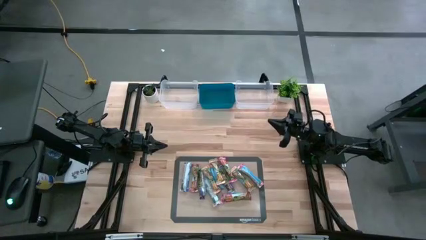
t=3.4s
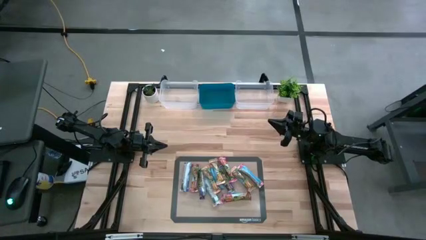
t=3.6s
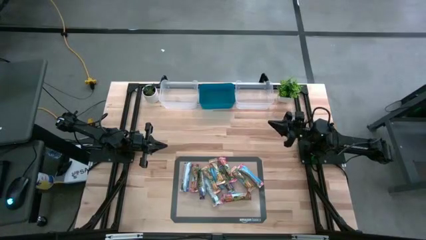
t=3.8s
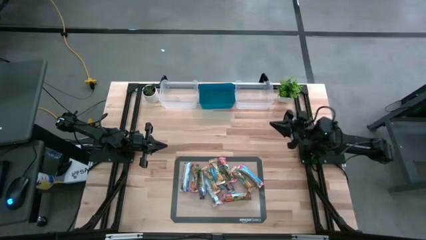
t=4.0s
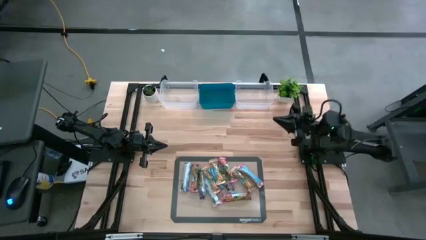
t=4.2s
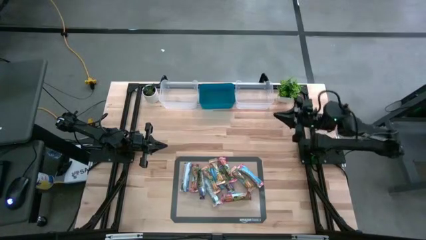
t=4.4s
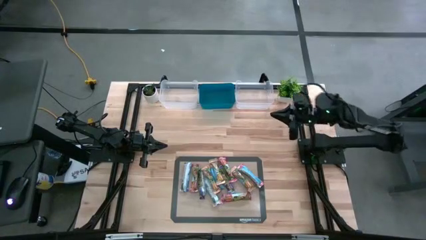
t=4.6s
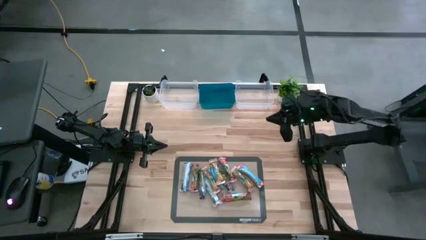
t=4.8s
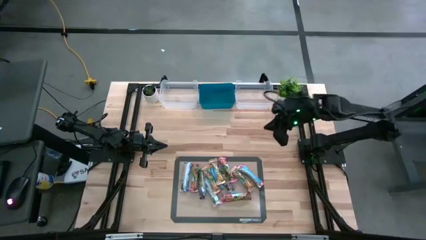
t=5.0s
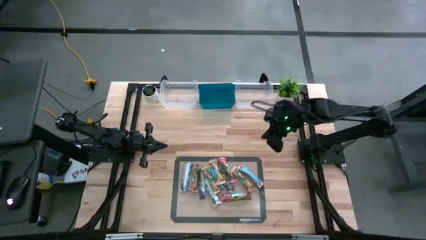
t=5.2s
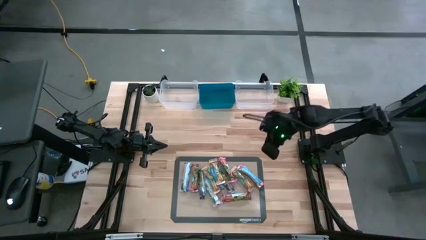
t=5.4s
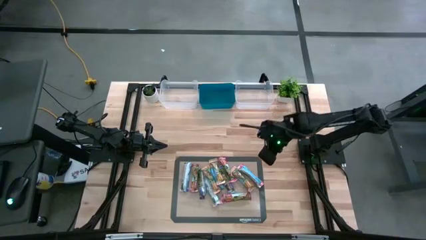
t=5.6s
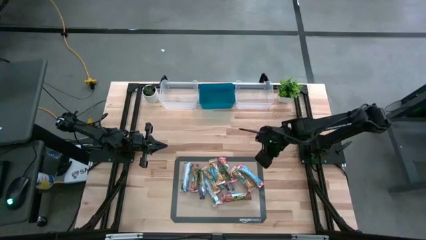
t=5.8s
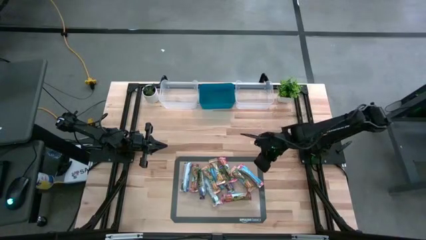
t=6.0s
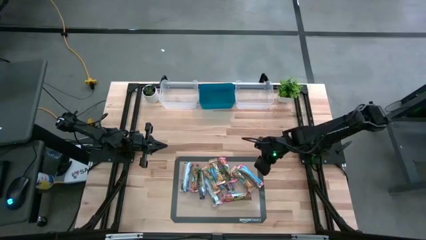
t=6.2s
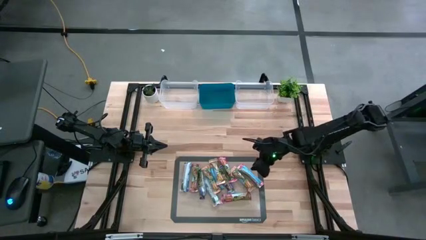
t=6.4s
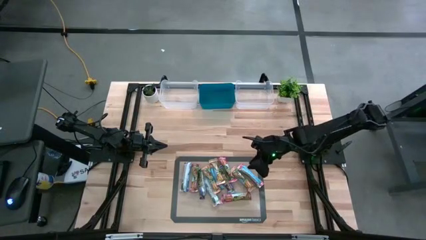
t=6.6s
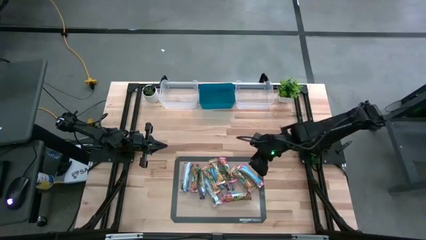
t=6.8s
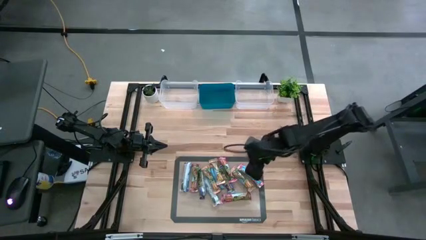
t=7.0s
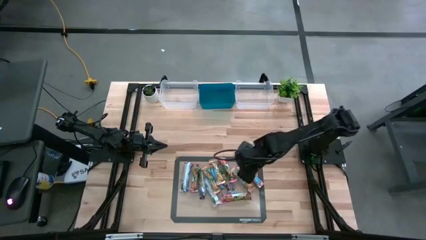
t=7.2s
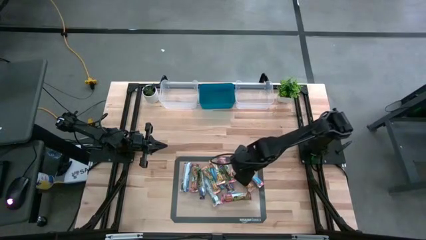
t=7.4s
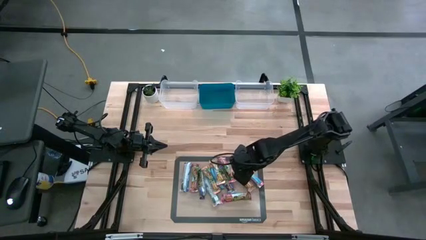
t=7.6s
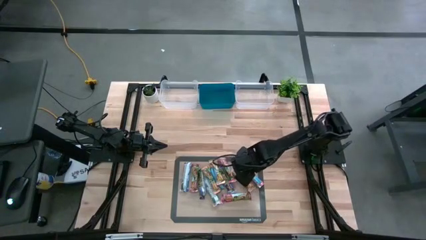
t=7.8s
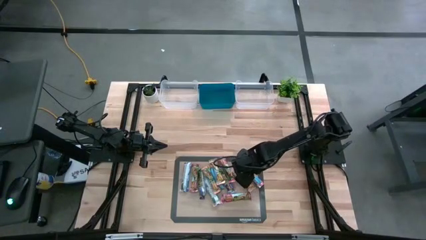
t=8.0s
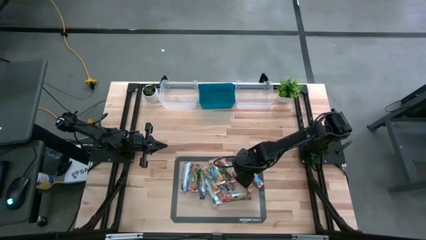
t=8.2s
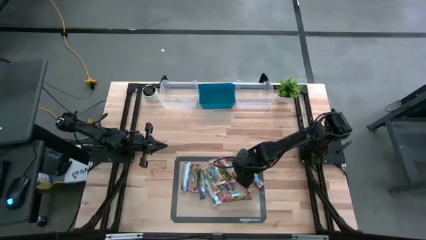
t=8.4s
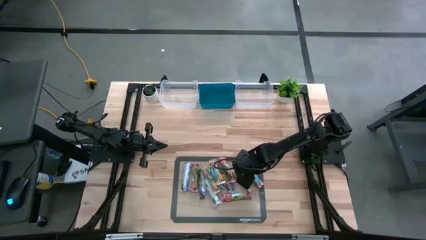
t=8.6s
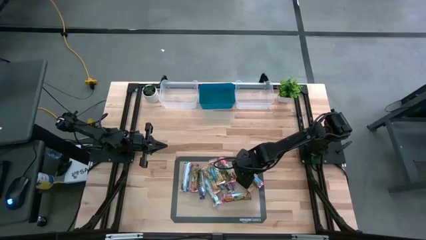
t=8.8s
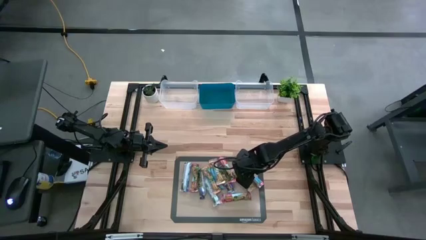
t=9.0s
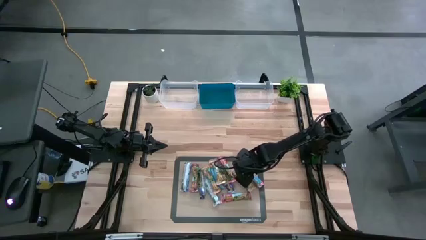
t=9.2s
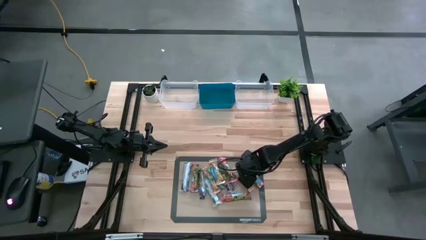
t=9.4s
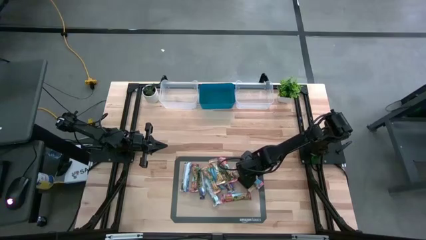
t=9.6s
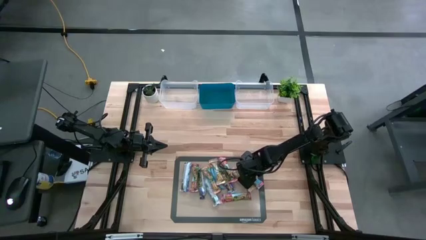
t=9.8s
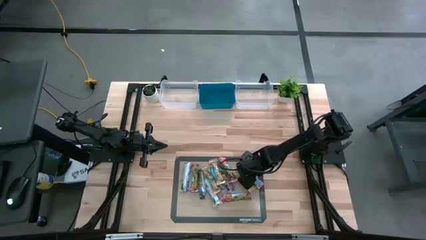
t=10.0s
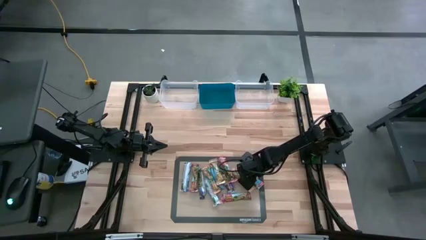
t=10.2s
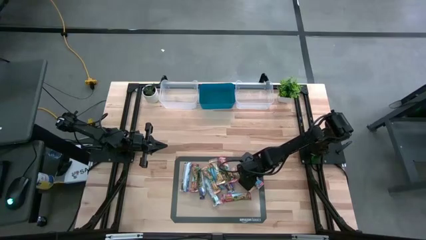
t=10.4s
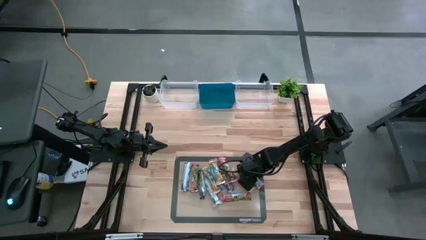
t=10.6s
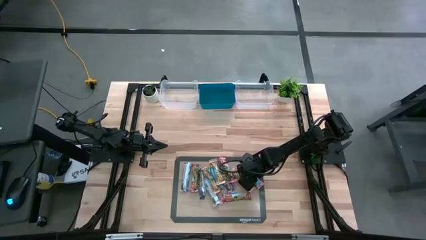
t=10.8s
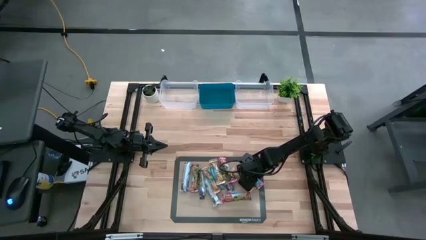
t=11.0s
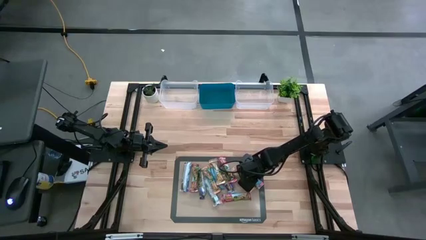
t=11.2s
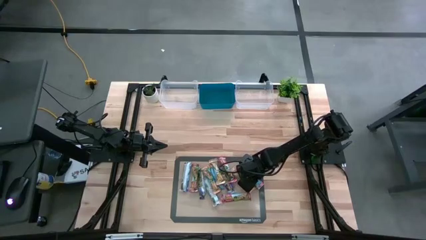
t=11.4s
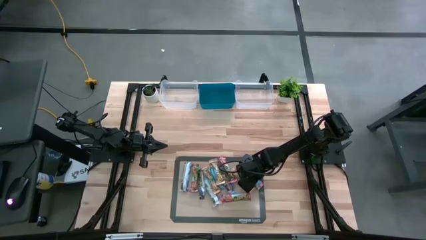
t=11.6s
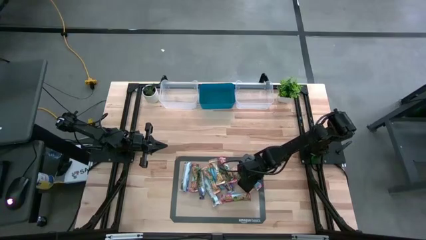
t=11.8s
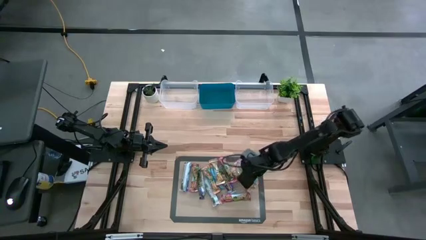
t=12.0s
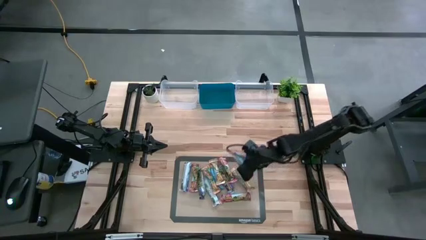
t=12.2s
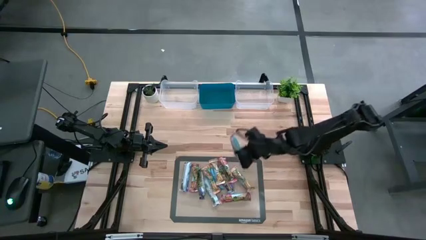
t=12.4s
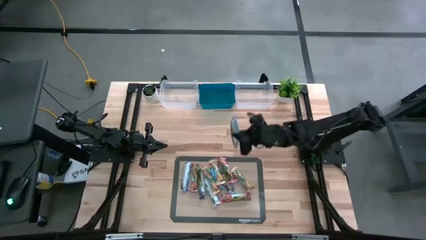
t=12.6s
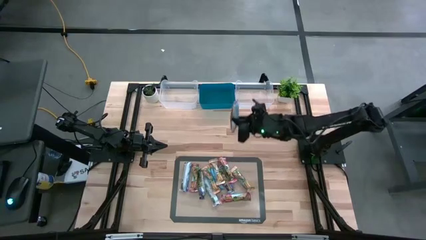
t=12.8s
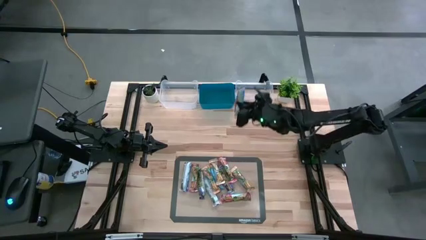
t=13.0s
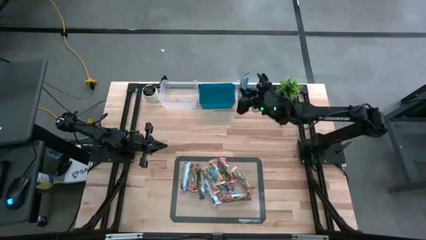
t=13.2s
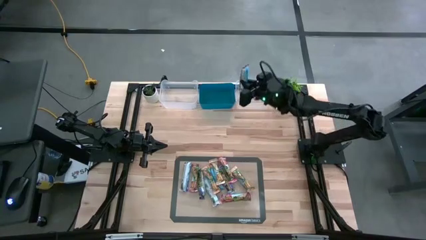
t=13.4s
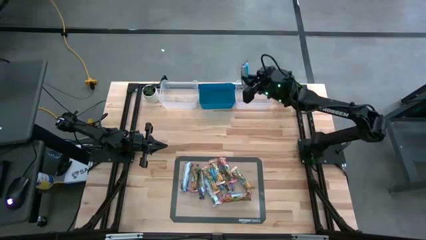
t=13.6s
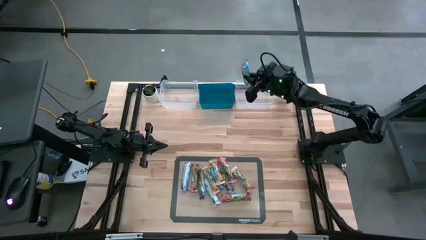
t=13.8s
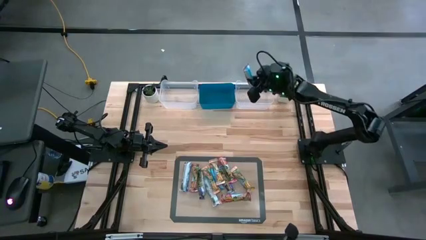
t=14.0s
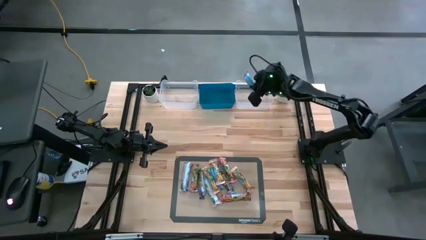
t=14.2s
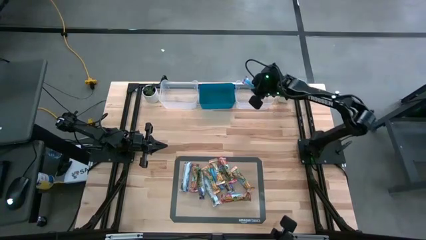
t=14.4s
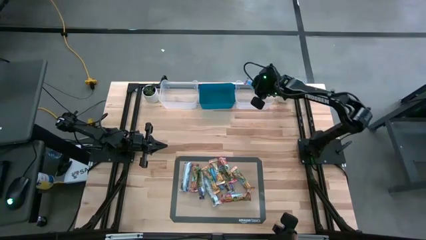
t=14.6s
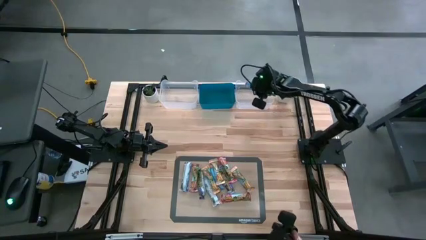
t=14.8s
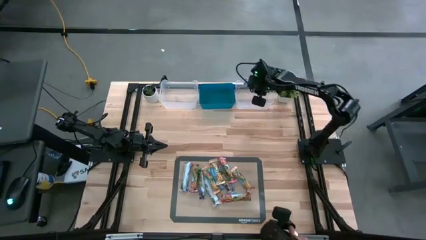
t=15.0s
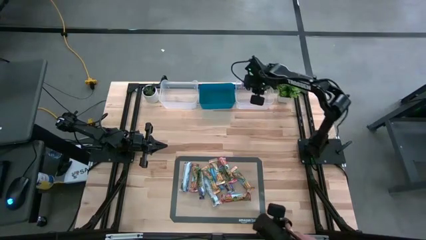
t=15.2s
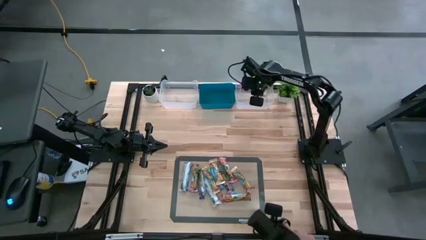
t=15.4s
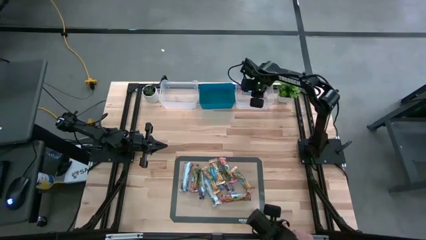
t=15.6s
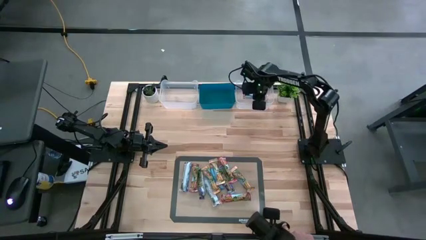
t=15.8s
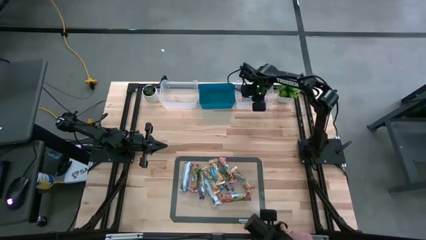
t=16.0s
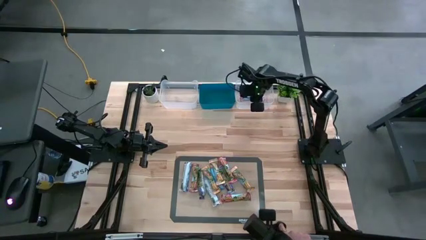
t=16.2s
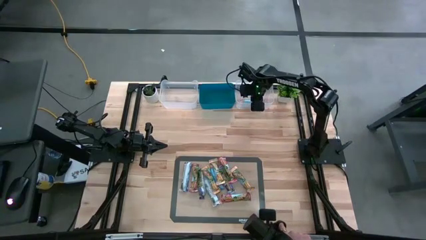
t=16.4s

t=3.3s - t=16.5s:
Task: Pick and place Granola Bars by type
Put the red granola bar into the right transparent bin

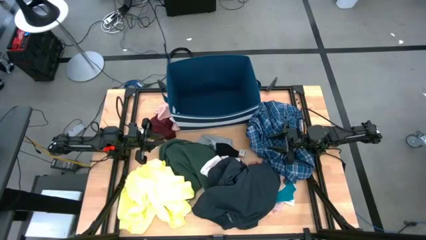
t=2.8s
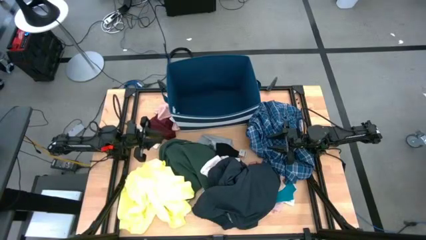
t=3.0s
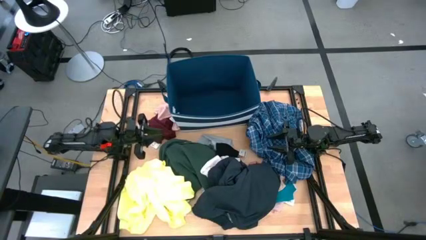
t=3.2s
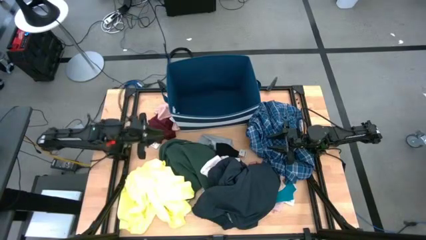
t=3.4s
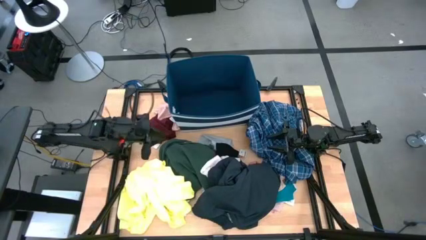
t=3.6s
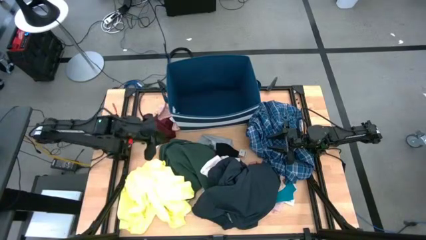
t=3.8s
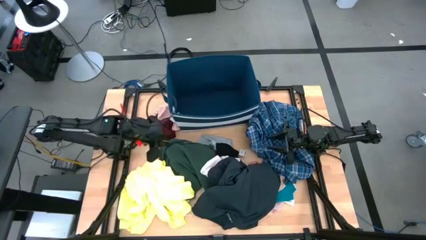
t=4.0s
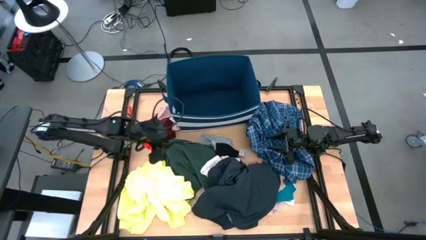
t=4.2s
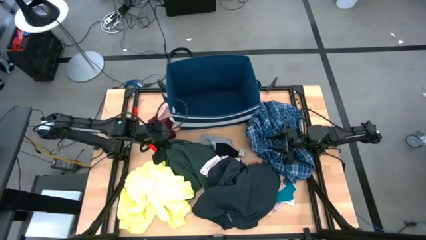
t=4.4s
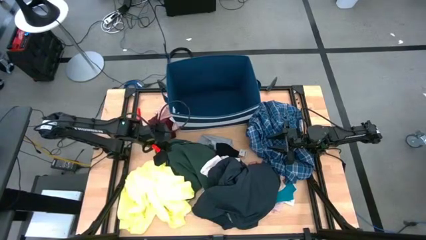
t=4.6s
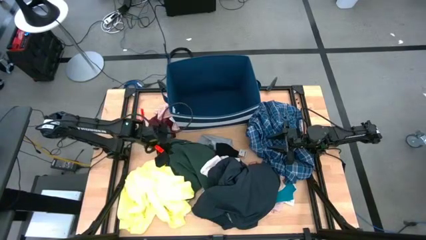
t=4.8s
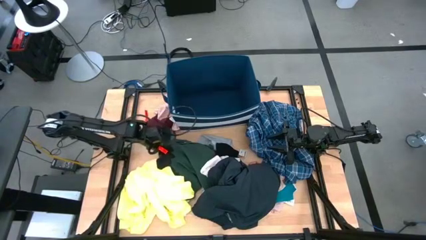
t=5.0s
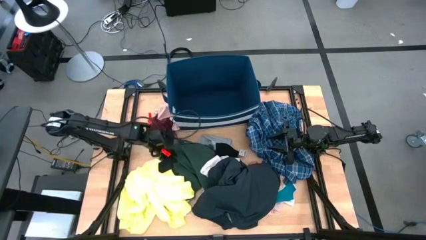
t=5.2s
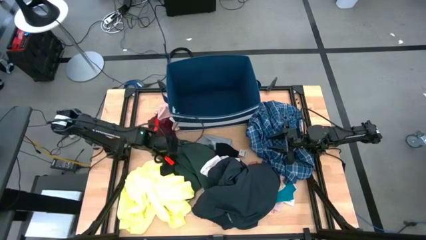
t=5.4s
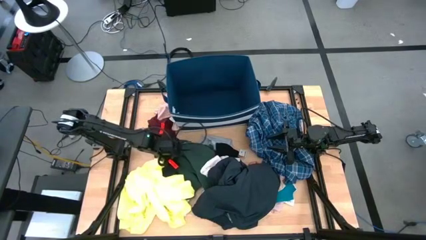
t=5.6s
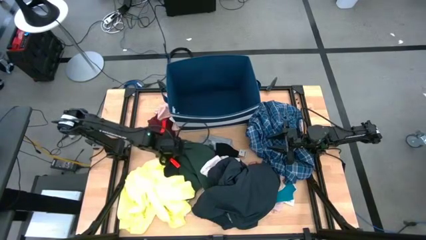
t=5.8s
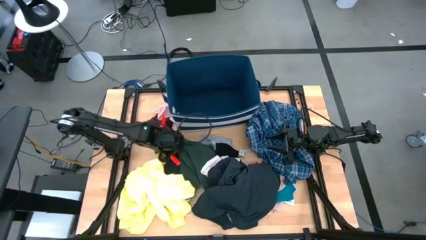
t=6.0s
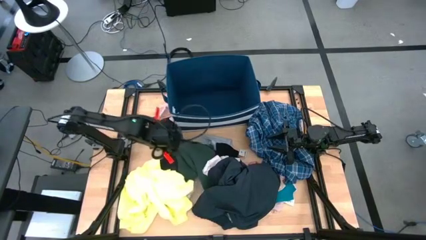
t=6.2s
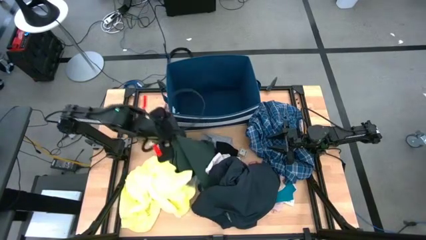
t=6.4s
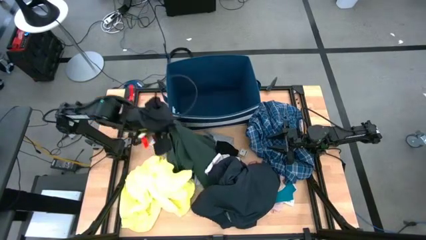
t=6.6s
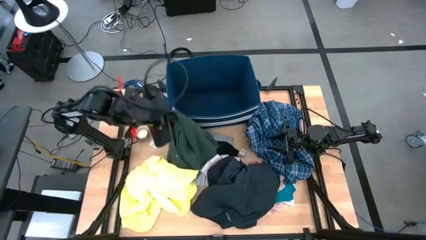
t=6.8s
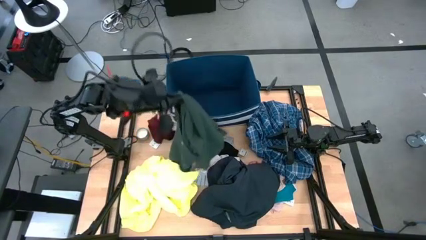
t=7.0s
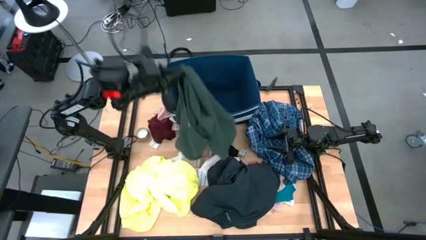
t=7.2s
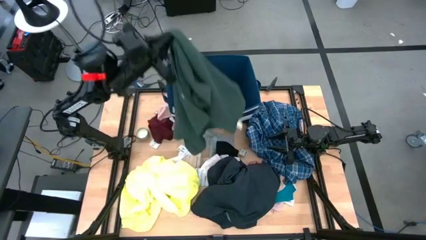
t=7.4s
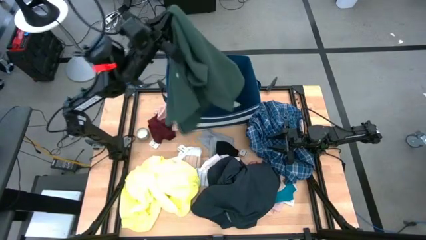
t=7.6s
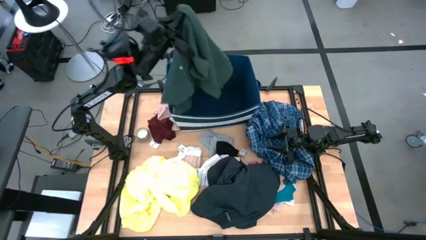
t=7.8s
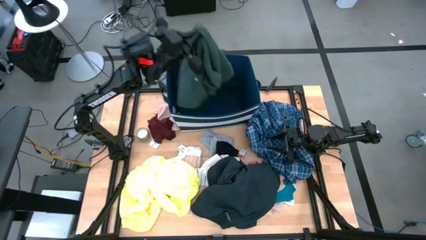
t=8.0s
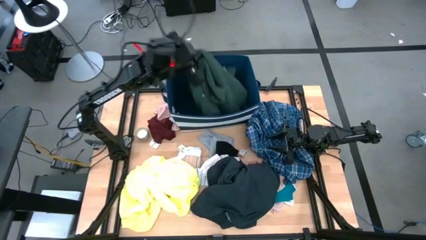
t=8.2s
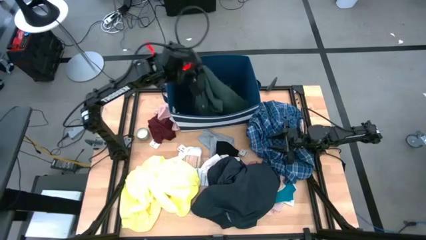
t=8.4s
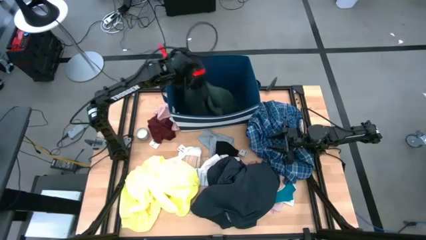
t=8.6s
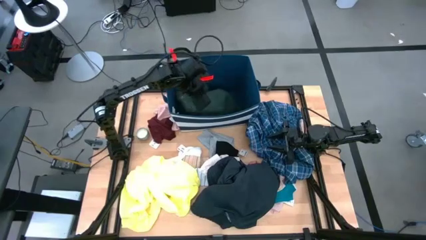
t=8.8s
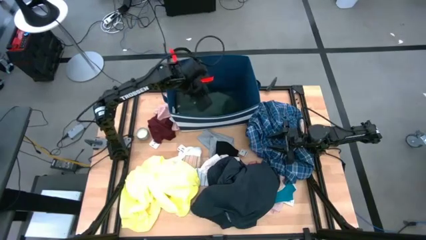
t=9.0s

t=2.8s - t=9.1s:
Task: Sort clothes
Put the green shirt into the blue laundry bin
